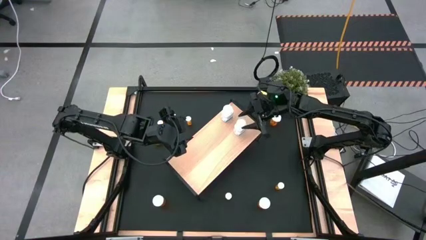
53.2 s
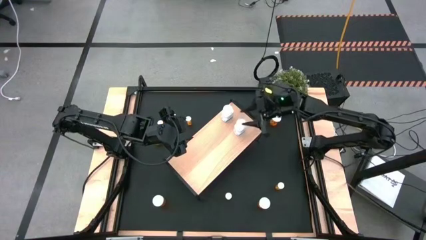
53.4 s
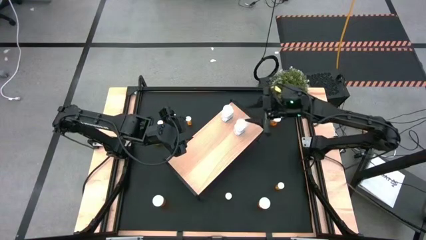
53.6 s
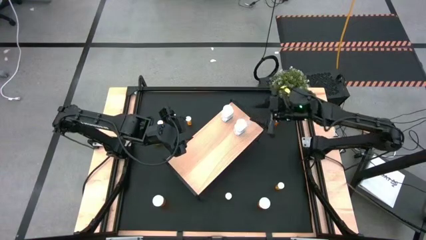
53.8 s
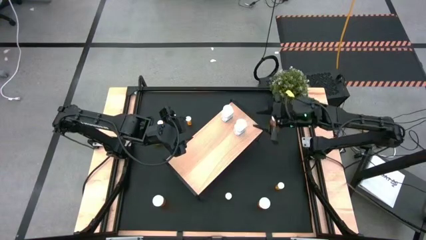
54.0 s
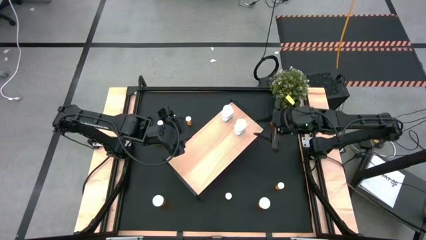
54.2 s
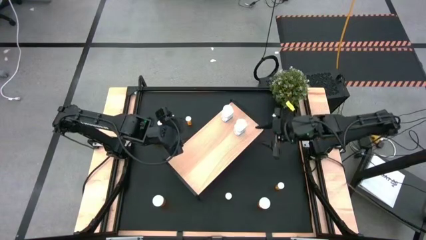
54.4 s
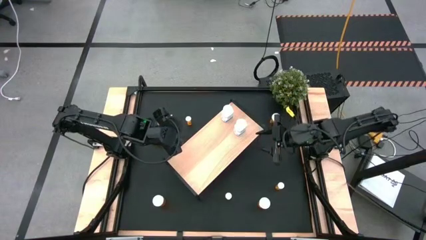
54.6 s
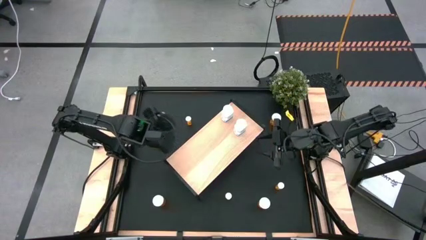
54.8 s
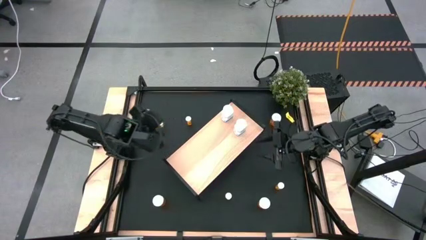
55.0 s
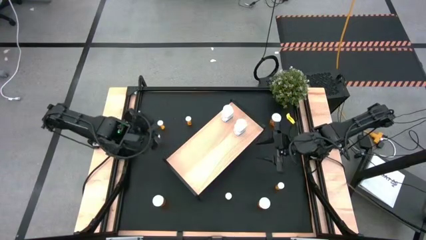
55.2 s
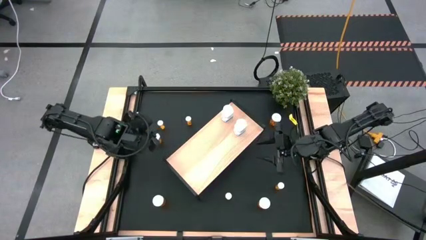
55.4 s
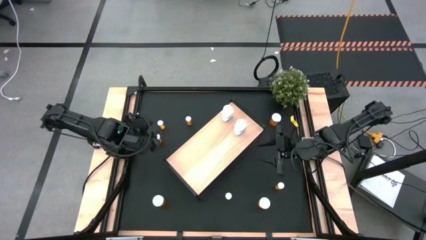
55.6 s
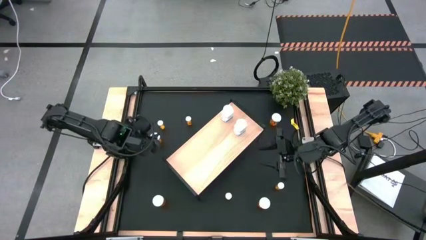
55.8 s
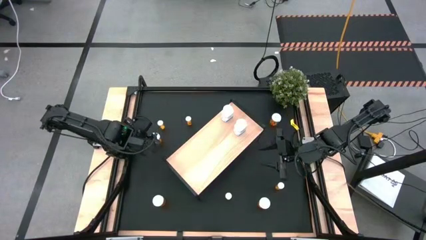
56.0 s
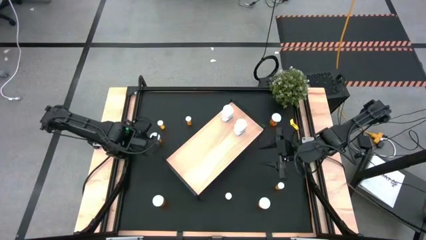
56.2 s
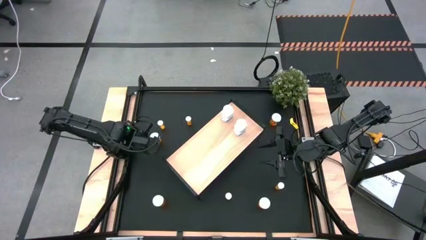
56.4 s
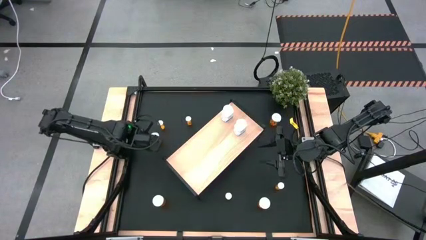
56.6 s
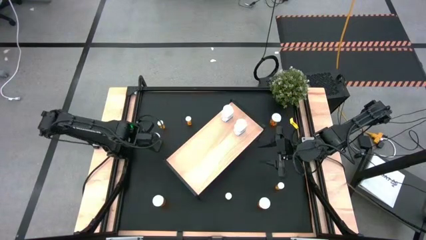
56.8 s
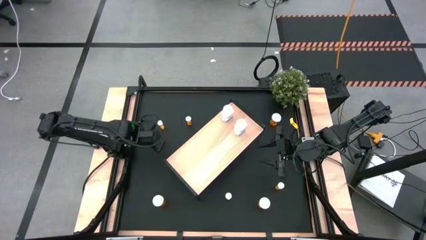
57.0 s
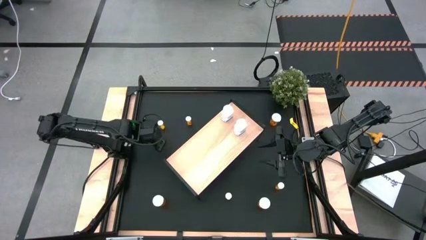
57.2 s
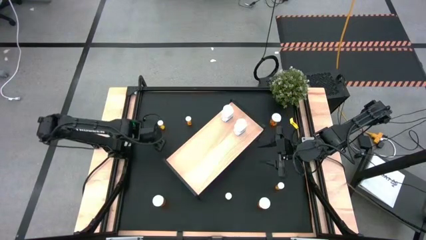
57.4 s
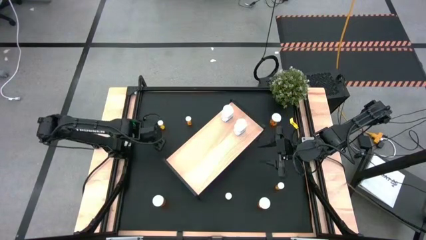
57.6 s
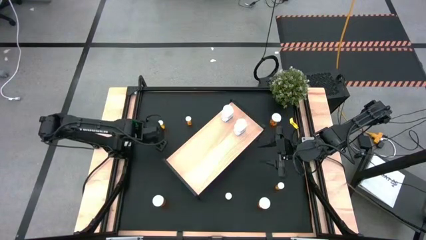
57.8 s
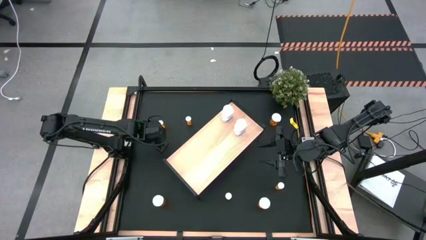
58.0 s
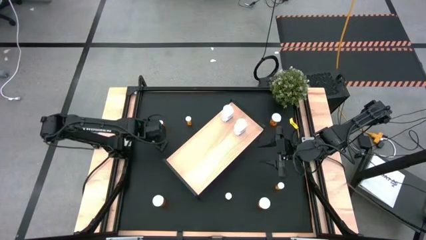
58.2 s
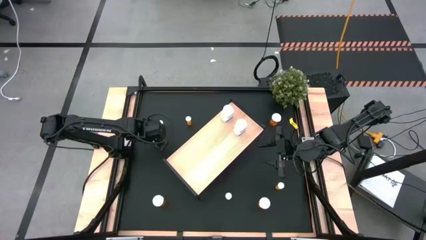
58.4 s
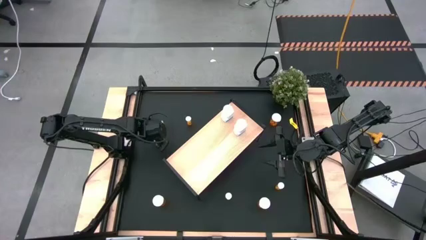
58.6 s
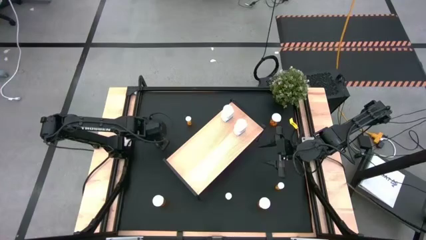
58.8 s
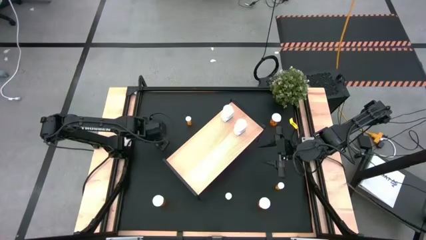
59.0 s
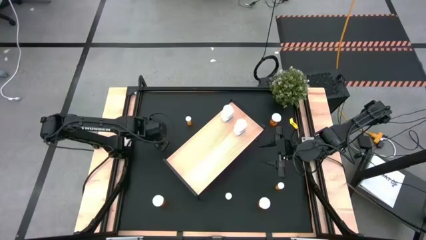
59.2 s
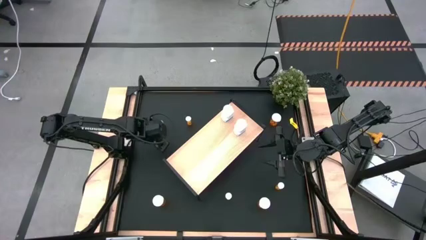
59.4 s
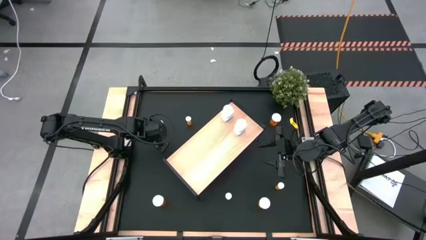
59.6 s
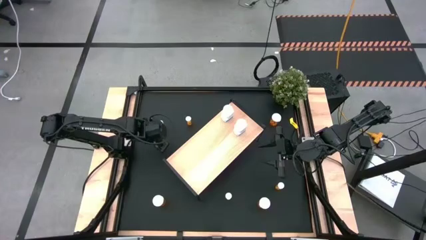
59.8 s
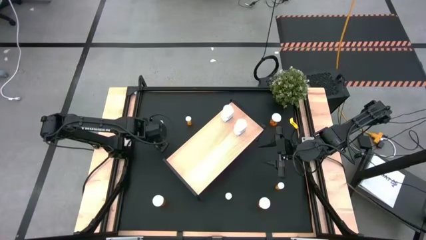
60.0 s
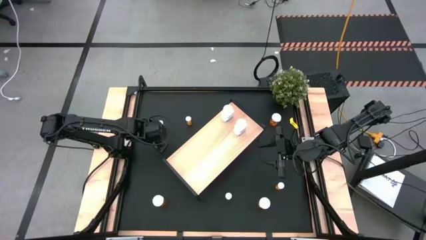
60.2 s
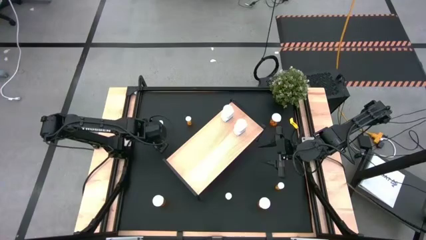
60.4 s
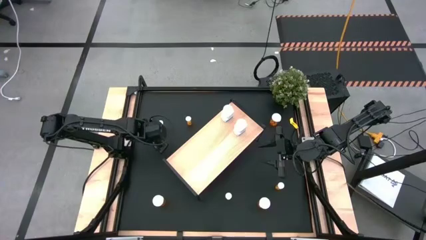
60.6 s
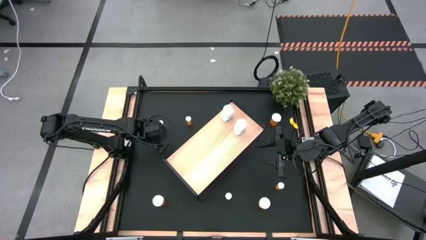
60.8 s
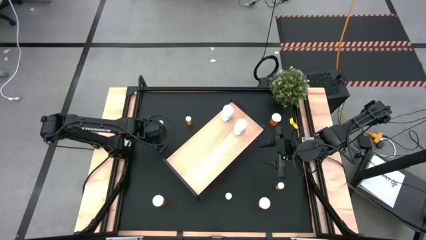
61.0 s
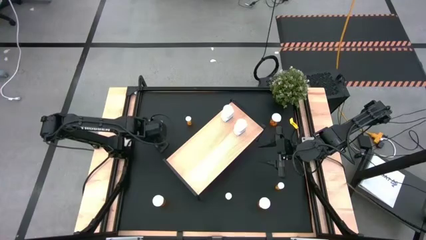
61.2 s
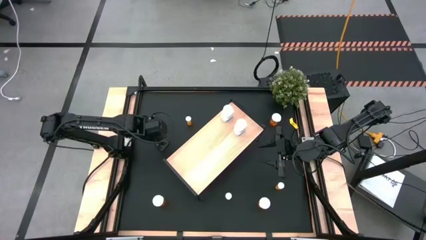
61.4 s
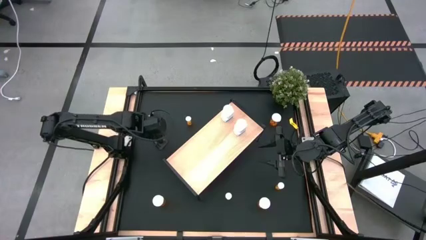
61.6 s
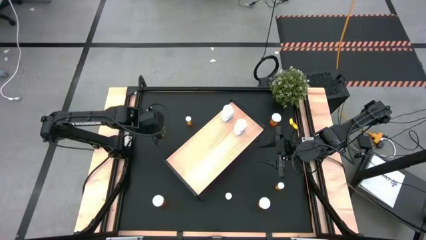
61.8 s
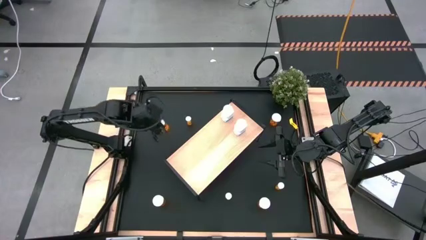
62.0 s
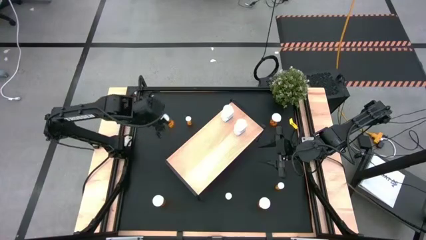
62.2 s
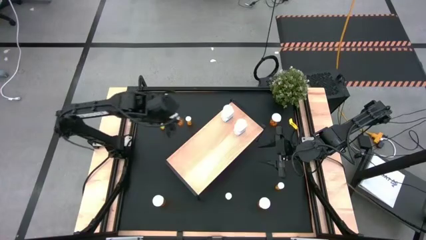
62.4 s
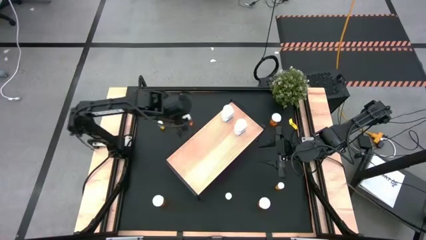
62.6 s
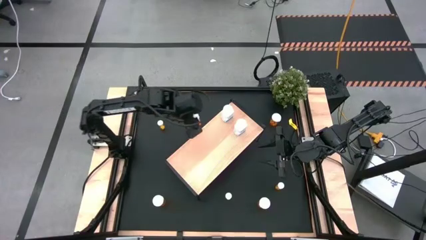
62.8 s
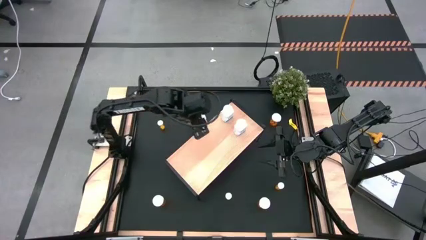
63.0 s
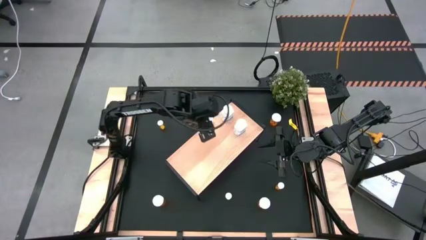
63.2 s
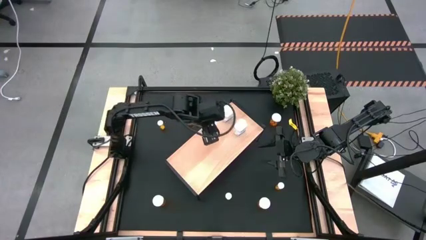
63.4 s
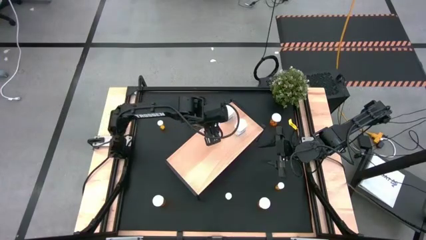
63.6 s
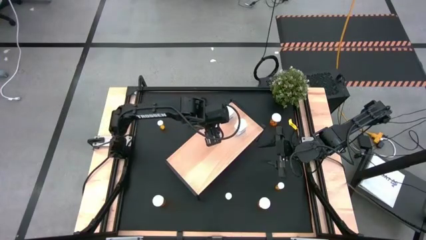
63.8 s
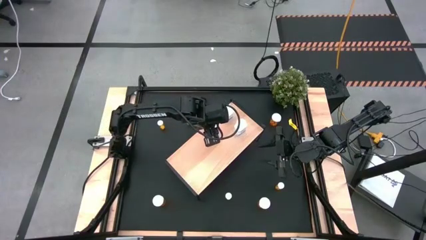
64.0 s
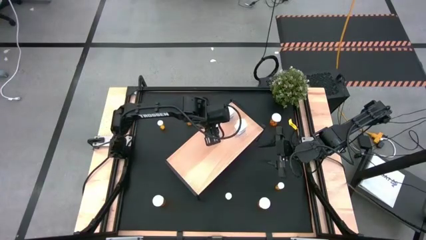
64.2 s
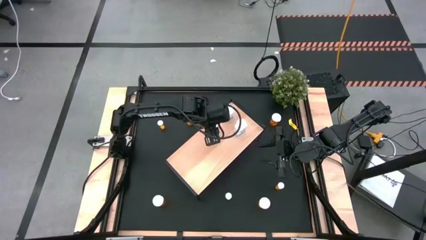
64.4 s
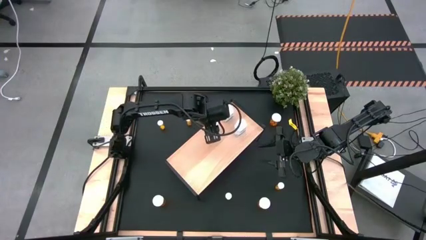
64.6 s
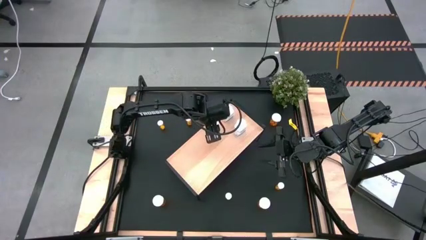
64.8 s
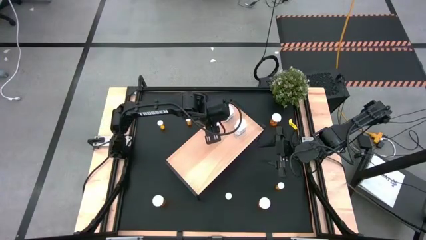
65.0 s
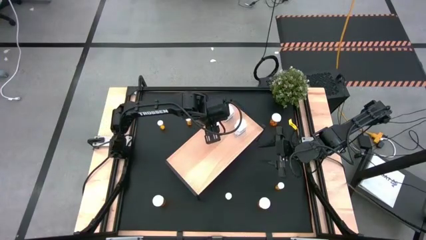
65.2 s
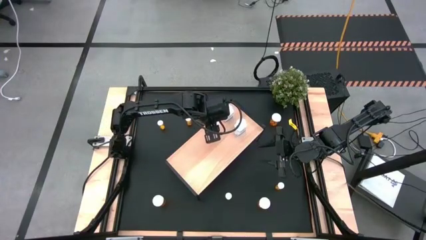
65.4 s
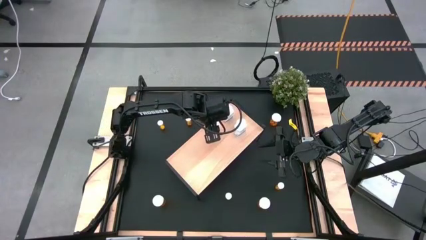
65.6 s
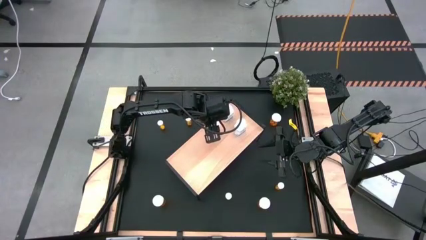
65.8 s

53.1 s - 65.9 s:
Task: Pick and place medicine bottles onto shelf by color
Put the large orange pill bottle on the shelf
